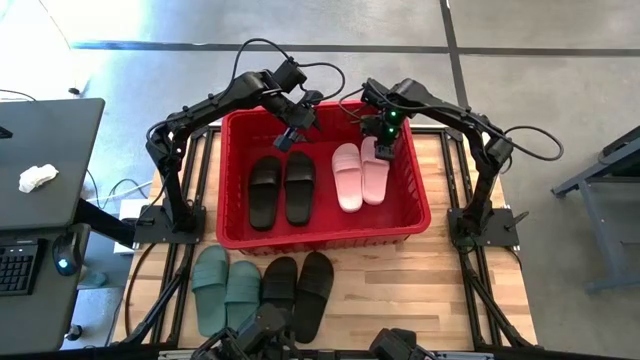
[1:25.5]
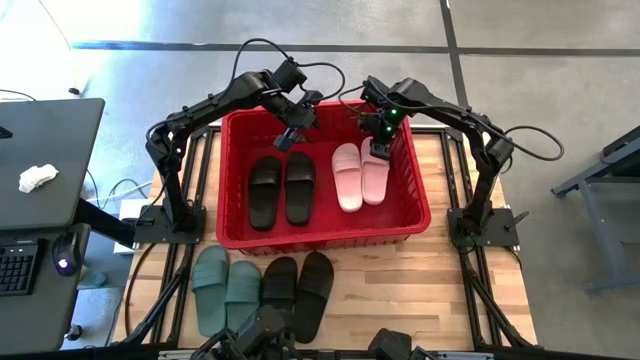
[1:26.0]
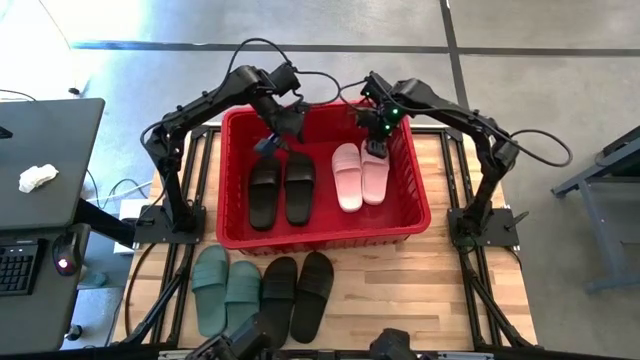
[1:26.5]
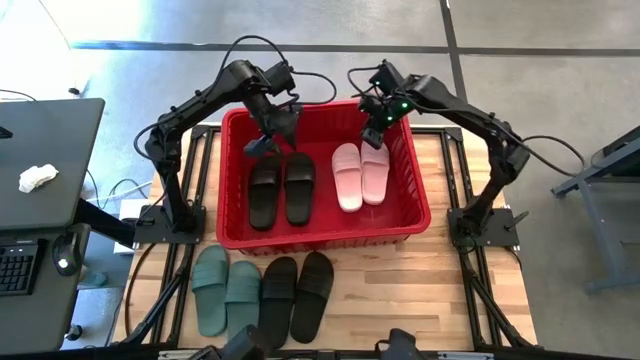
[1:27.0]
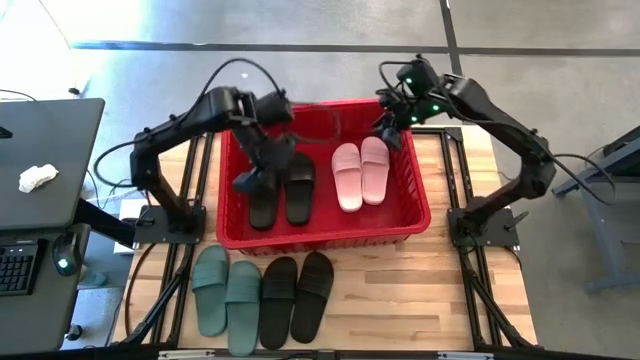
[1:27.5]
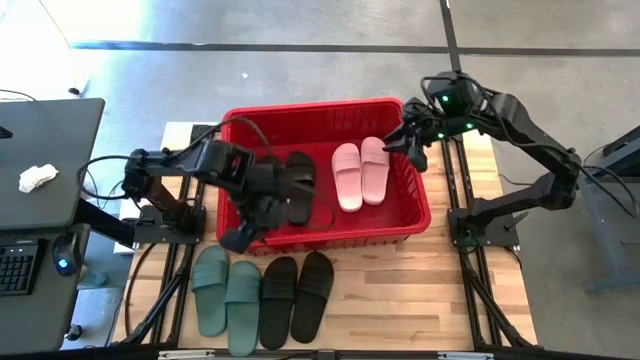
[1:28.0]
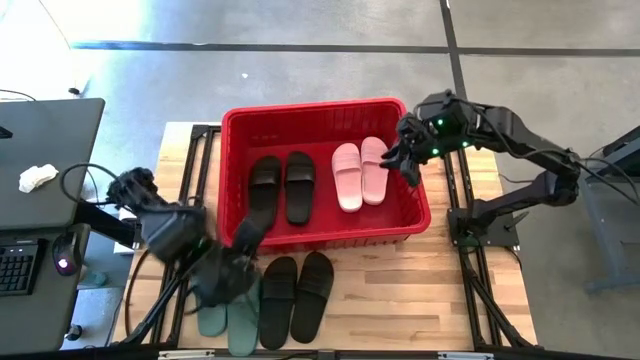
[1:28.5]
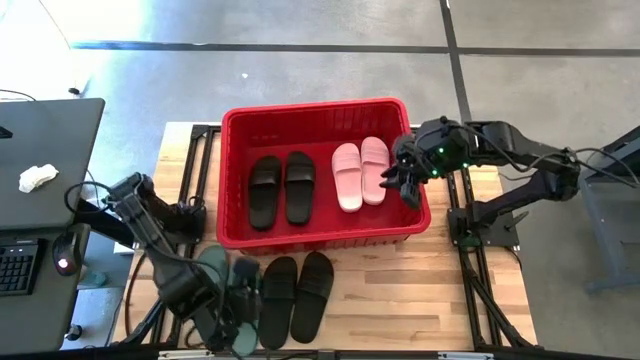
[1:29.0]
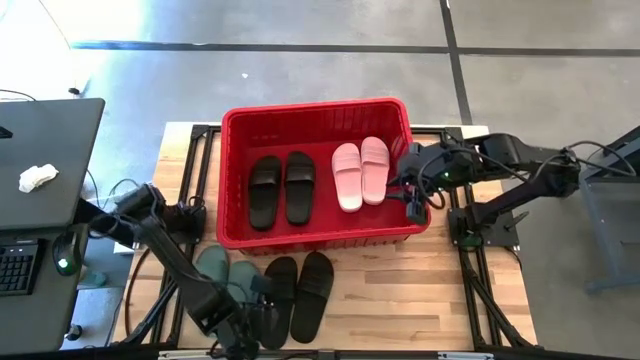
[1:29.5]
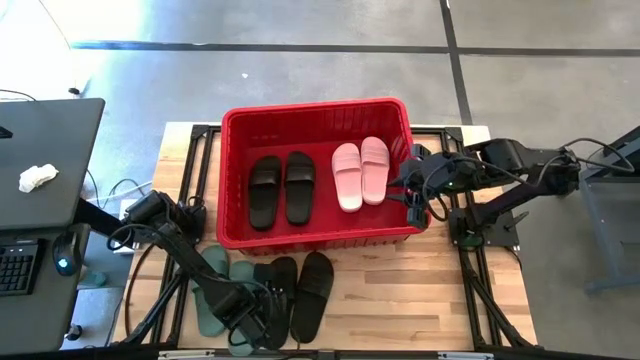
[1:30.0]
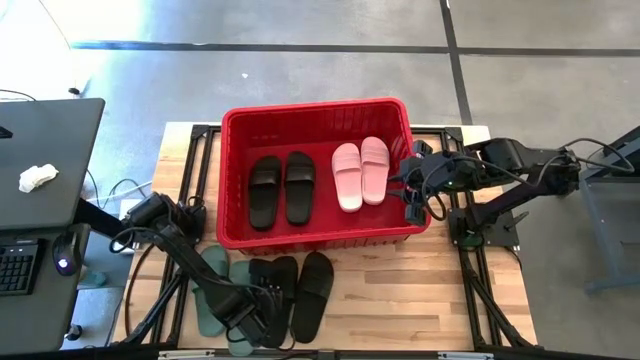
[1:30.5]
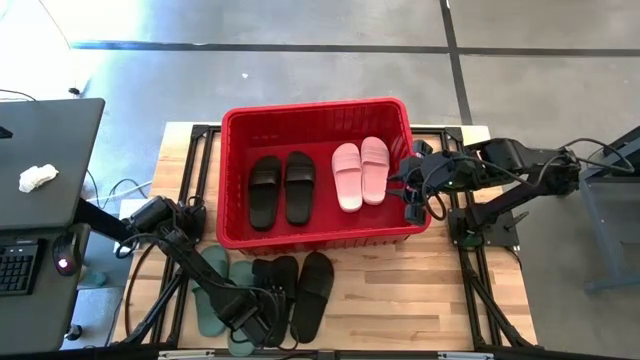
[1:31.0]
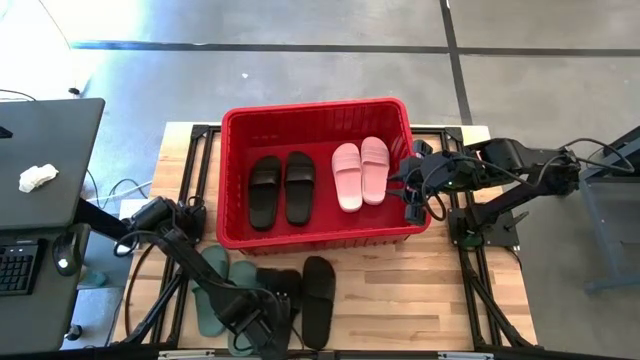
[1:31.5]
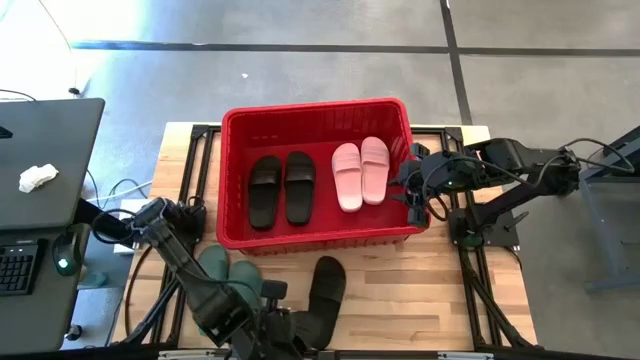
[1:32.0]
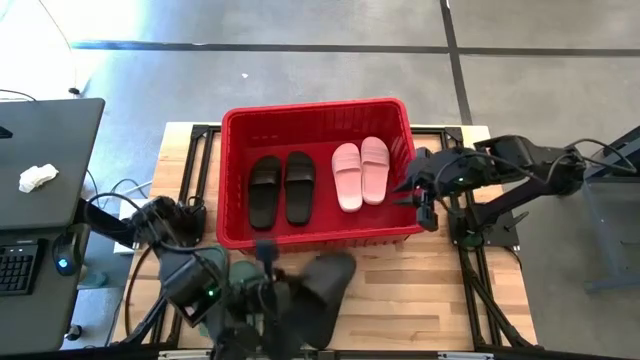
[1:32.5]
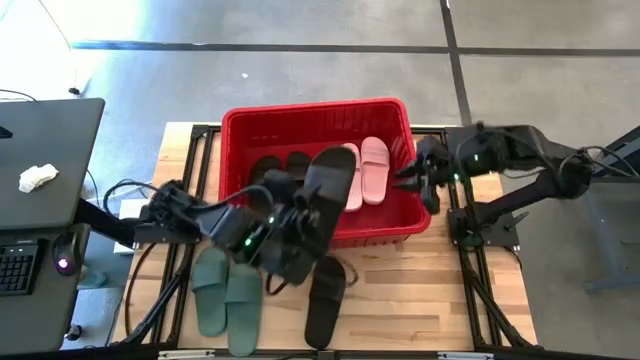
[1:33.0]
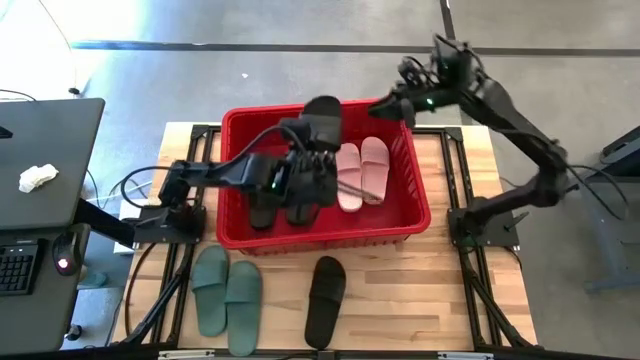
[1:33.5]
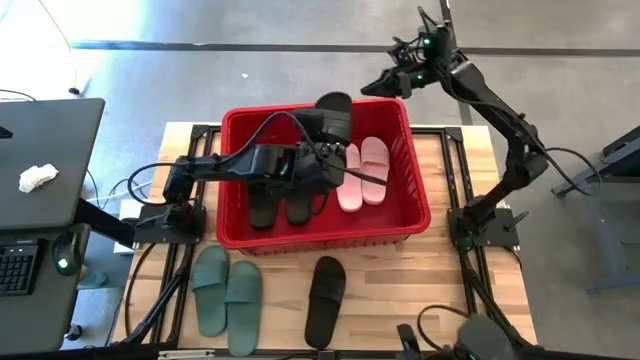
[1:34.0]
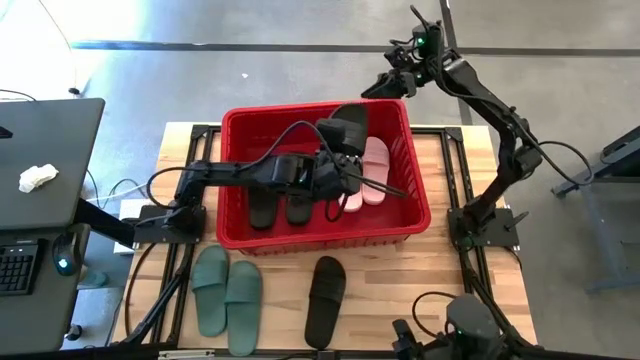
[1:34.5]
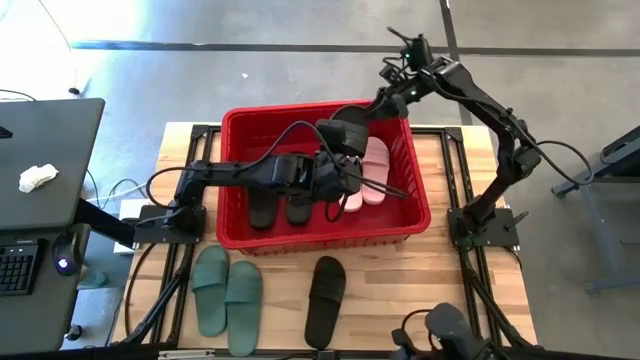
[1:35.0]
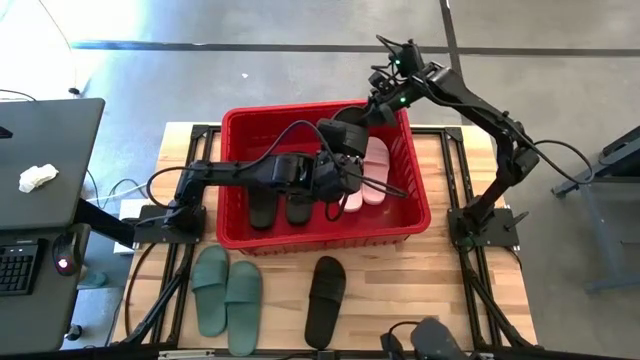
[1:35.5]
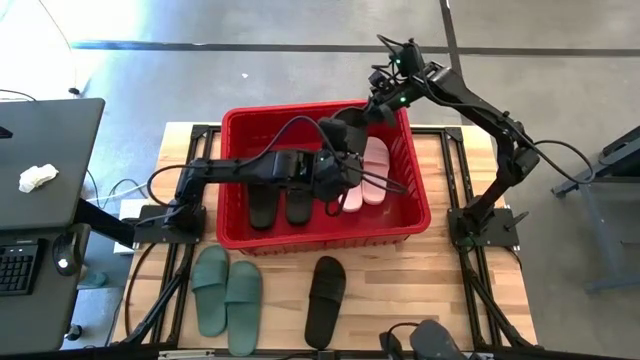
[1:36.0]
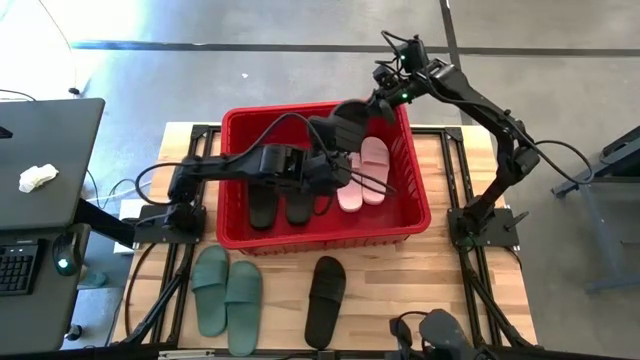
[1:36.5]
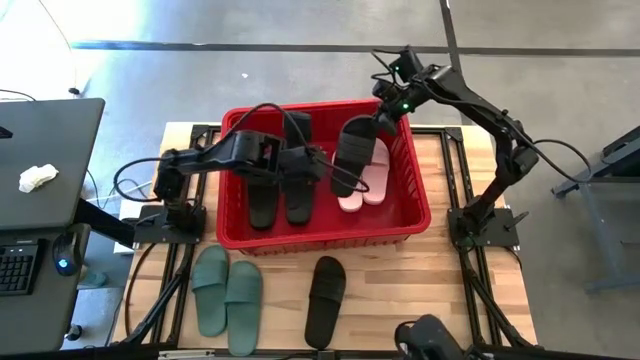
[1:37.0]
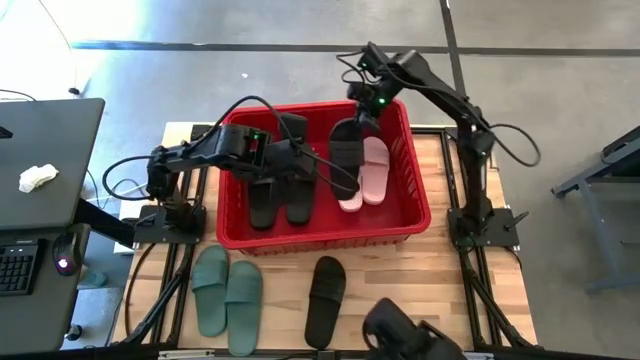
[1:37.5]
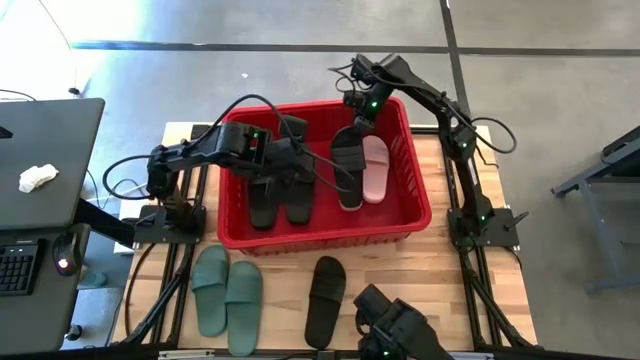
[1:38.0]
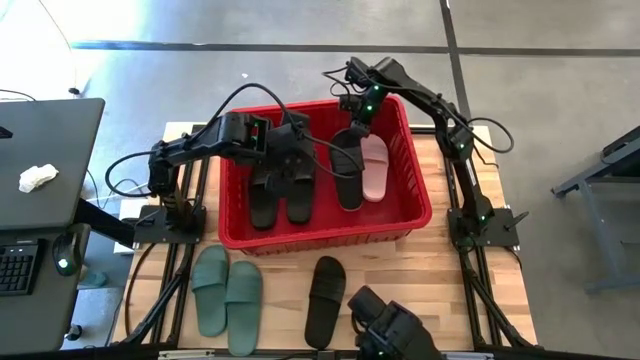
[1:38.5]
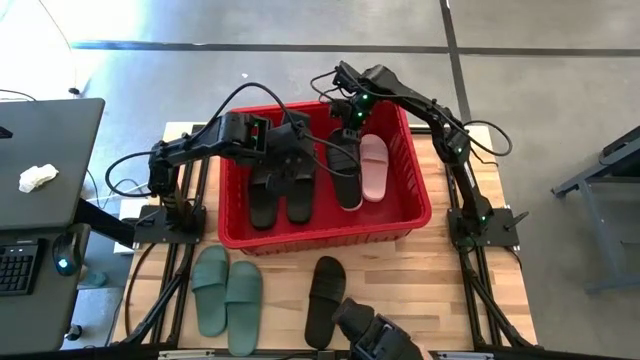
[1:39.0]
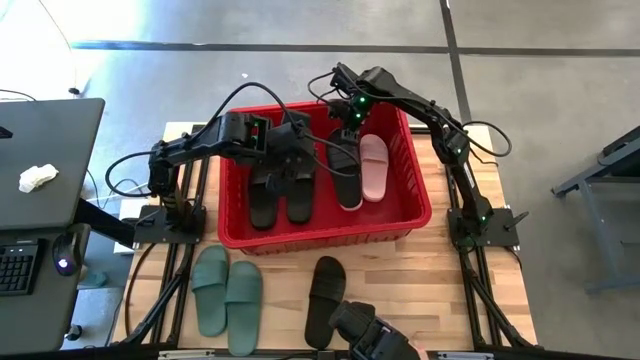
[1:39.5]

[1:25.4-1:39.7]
Task: Pick and place slides into bin
Stack the black slipper on top of the pink slipper in the red bin

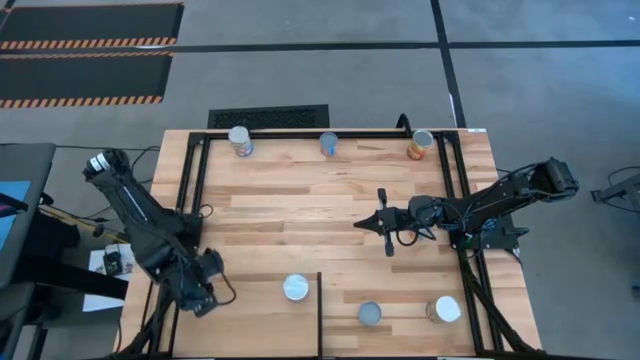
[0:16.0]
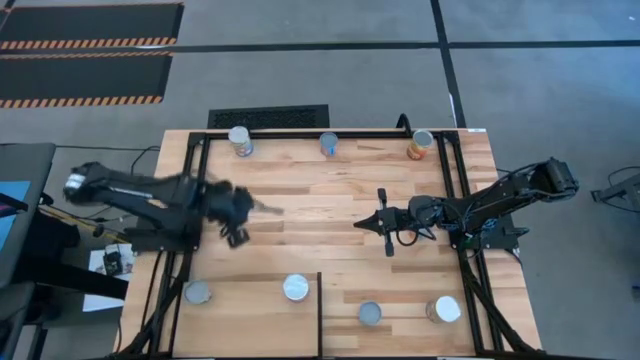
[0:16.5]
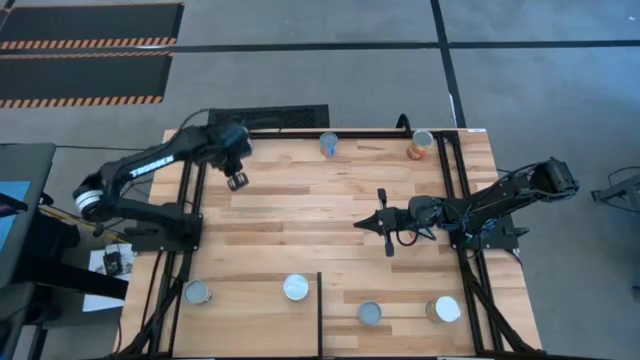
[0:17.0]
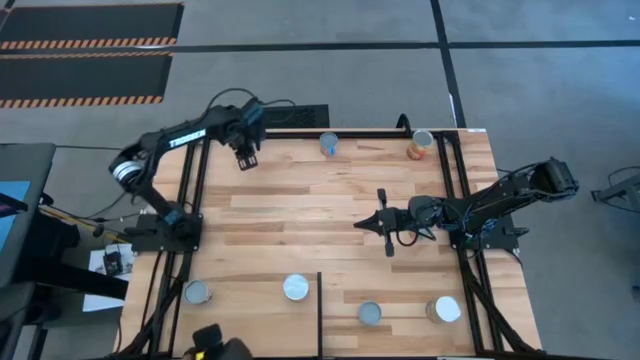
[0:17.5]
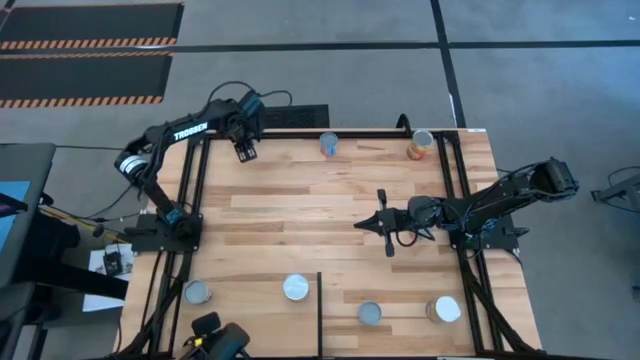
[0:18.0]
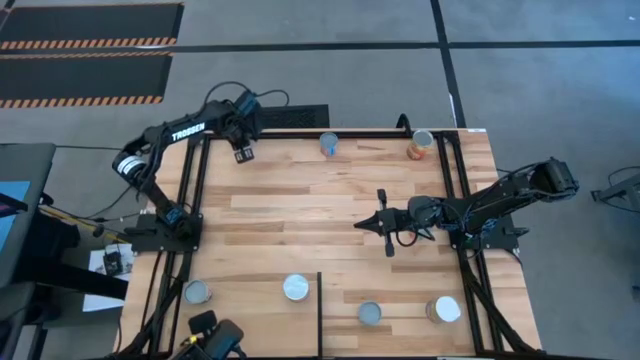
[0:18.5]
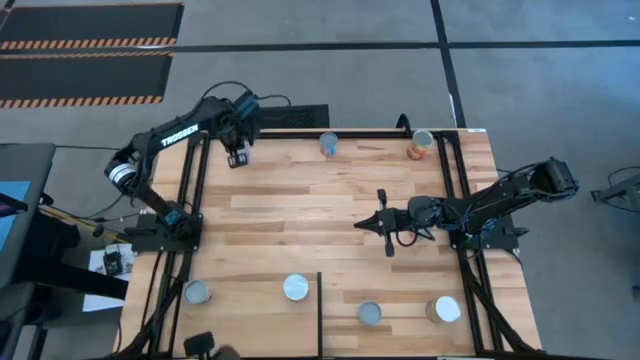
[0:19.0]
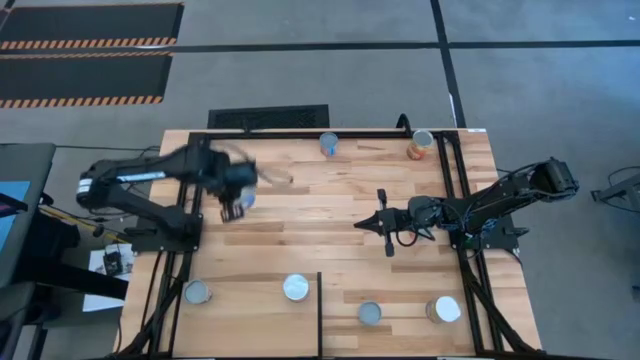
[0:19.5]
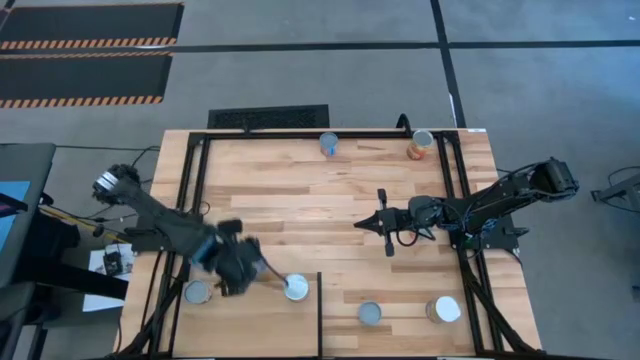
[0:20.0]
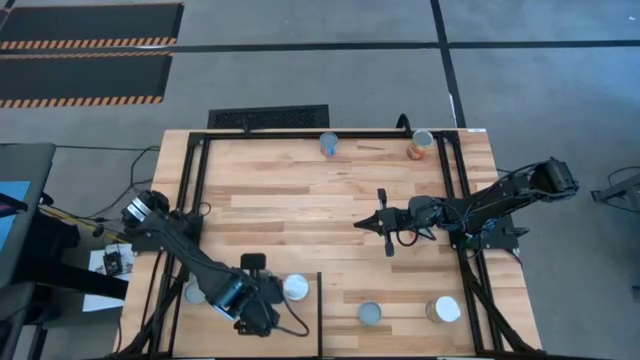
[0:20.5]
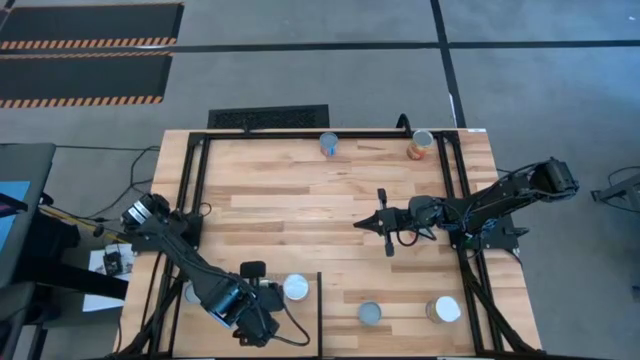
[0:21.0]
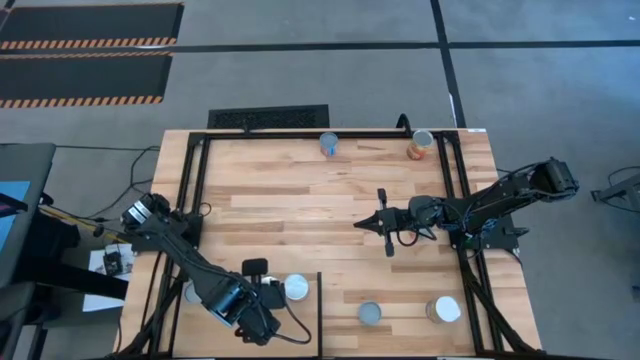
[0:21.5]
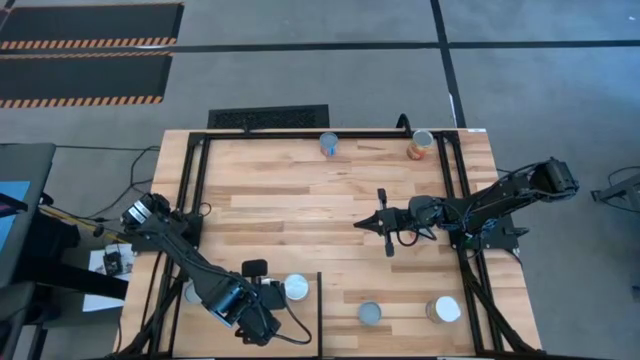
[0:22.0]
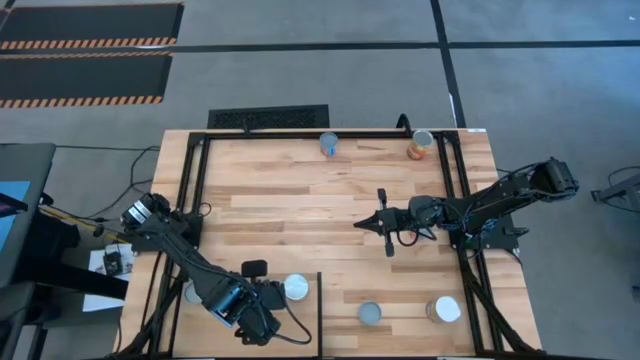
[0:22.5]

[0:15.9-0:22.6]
Task: Pick and place cans onto a shelf
Put the top canned peaches onto the shelf
